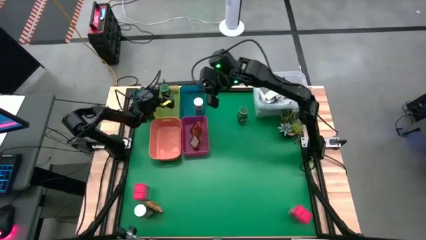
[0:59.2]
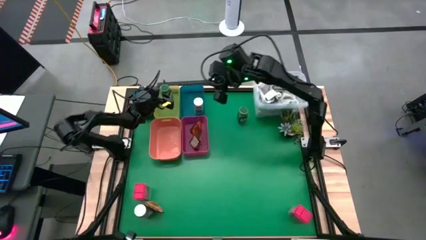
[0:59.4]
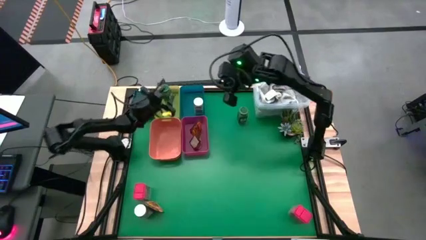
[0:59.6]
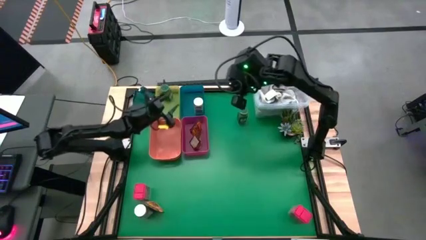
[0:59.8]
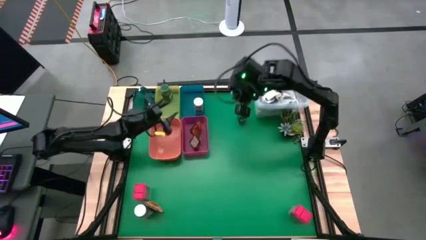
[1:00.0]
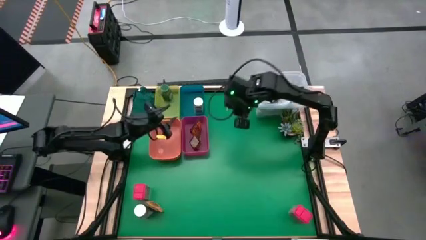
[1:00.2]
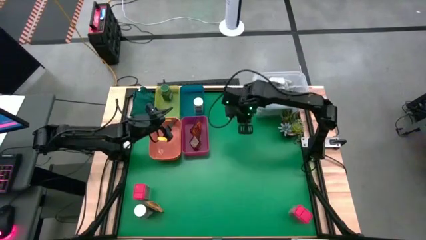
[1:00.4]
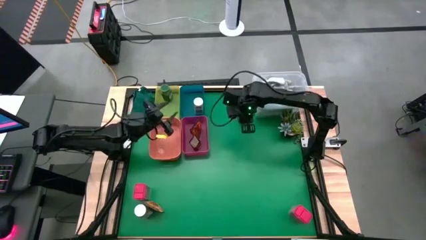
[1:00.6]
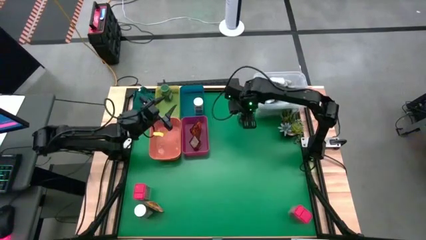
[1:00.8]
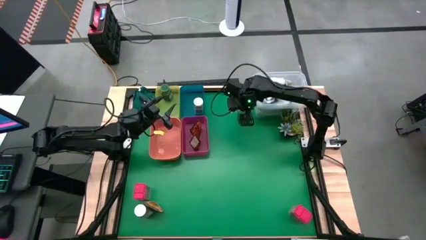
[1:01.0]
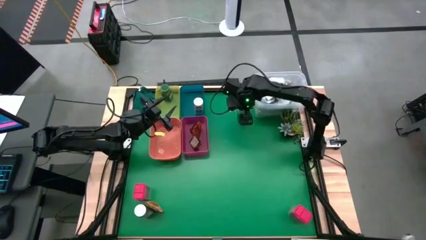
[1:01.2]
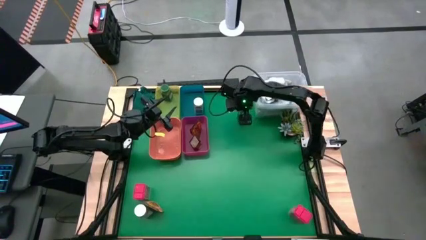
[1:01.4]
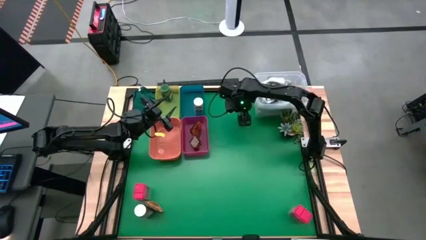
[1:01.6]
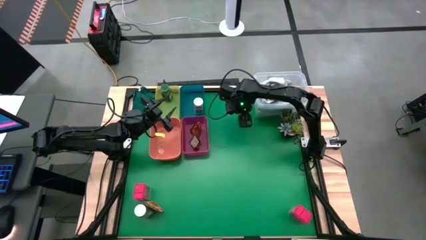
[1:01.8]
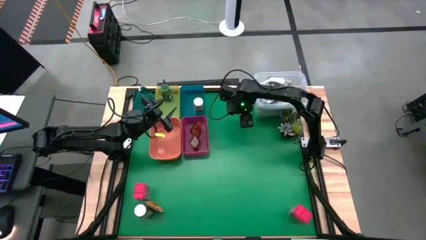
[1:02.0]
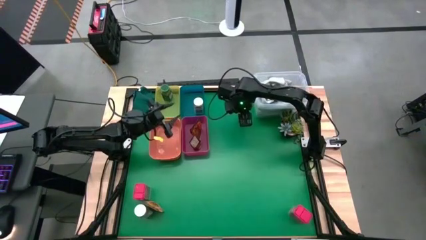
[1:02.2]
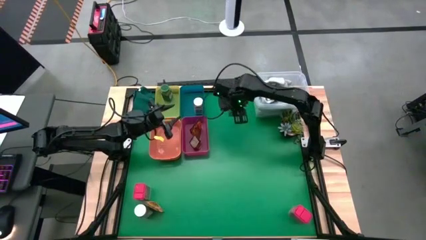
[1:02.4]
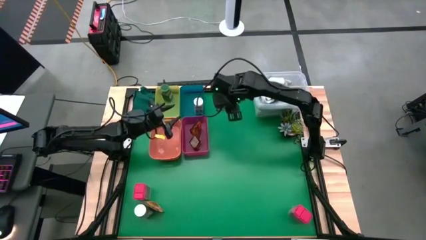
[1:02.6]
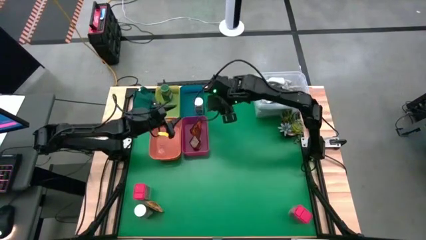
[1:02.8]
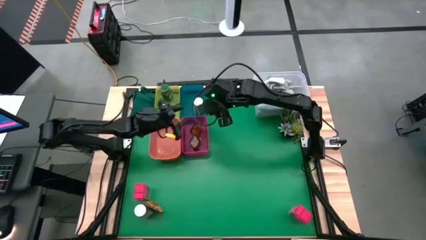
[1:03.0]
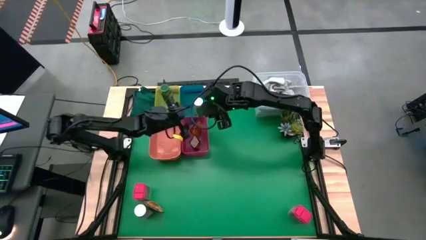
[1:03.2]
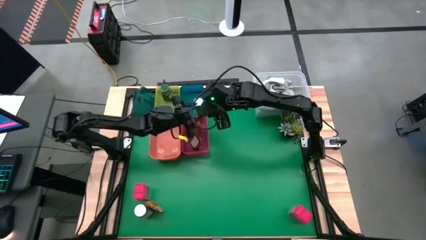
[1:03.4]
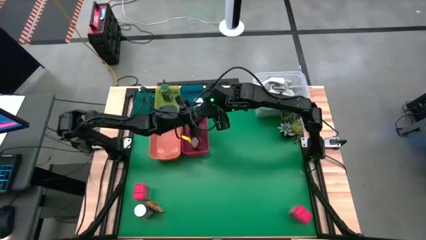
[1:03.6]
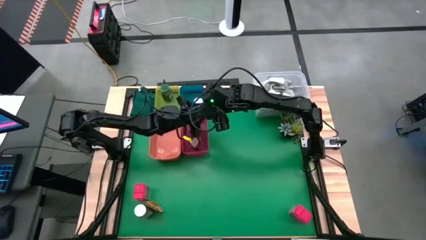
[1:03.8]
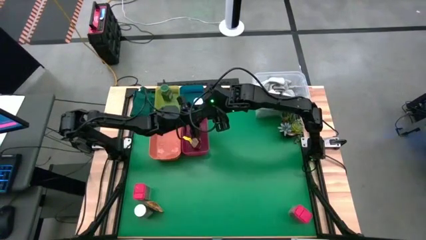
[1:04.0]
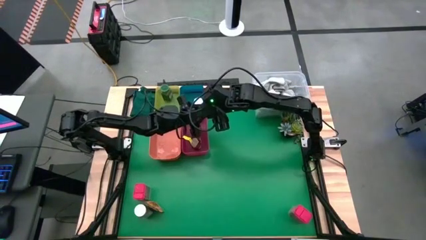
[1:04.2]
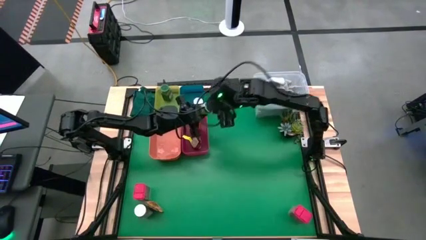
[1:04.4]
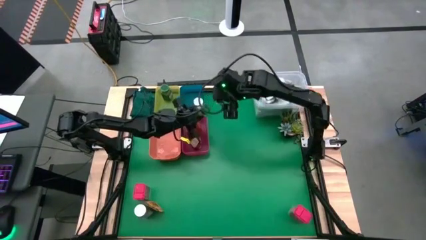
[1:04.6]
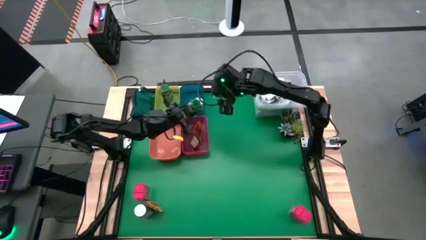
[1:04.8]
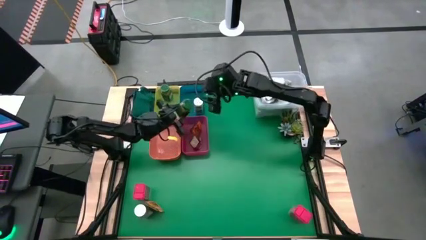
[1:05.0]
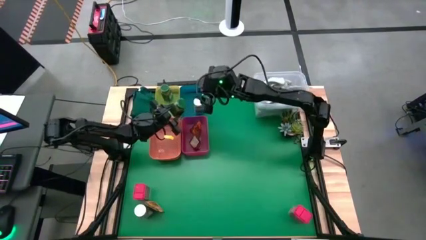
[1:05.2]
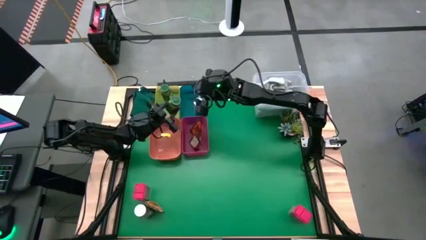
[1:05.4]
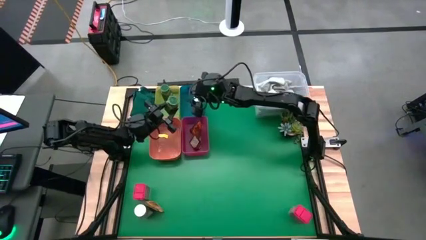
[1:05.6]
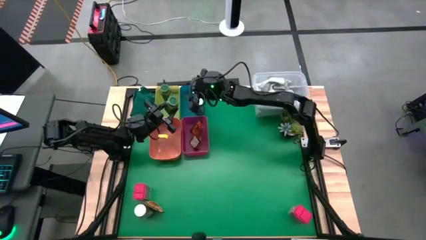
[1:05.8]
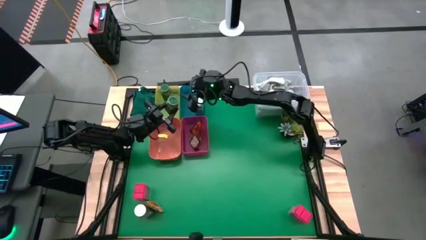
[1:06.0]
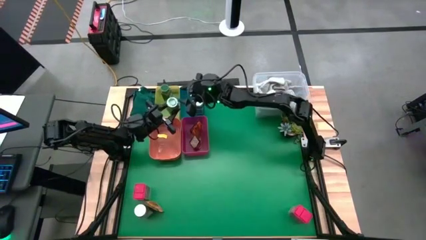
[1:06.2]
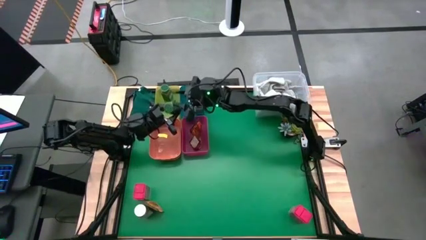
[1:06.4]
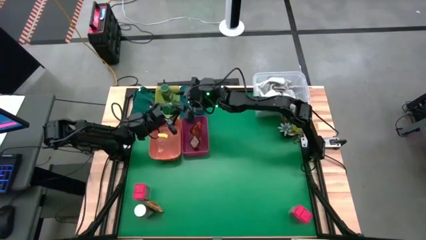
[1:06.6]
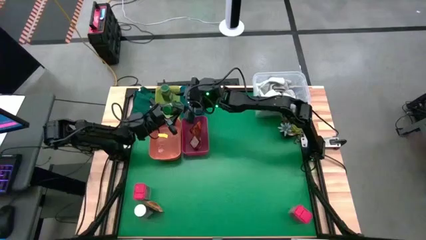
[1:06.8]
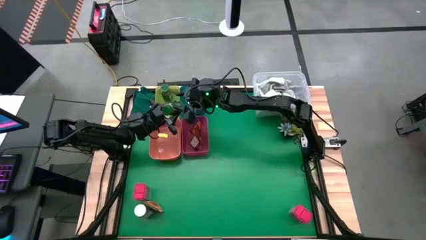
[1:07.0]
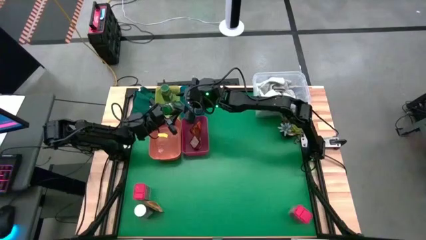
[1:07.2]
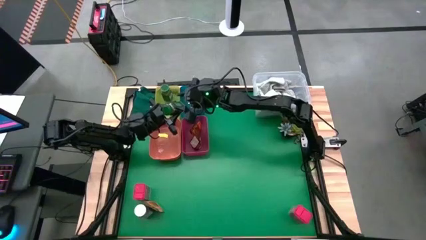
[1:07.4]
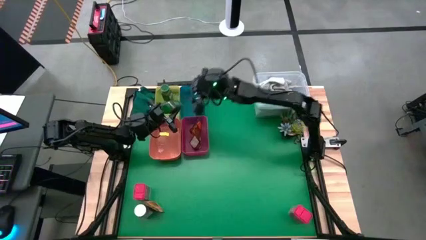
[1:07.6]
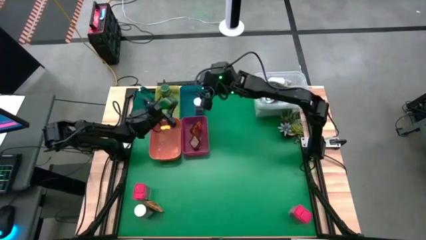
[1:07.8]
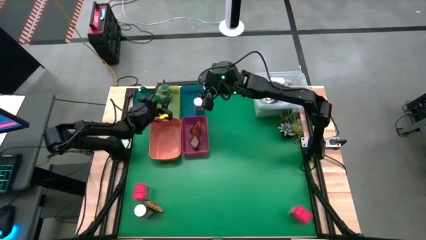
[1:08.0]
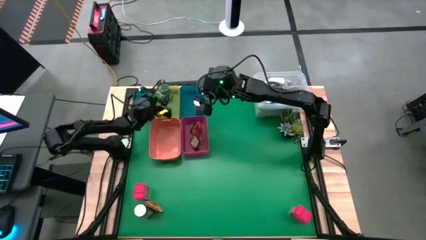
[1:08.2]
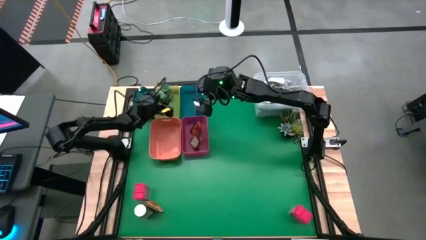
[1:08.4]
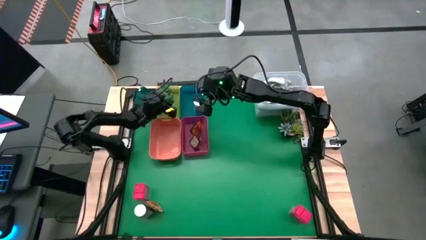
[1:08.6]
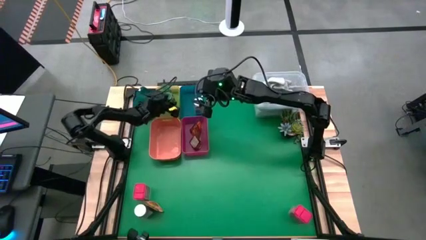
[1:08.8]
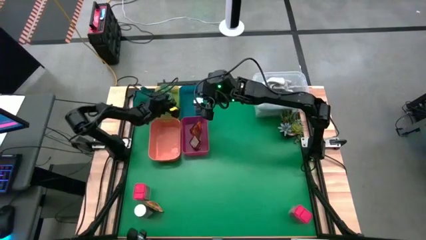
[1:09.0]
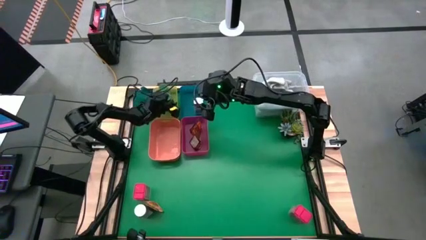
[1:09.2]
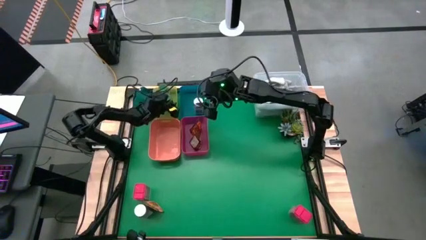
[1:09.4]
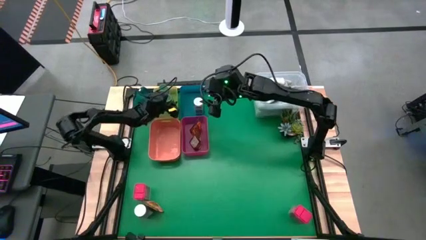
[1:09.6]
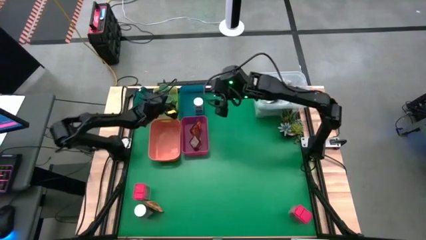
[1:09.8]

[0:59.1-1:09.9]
Task: Sort spices by type
Put the green seasoning bottle into the yellow bin
